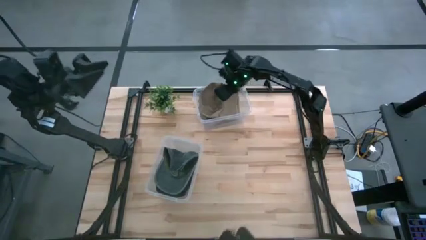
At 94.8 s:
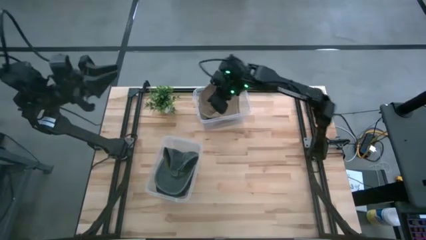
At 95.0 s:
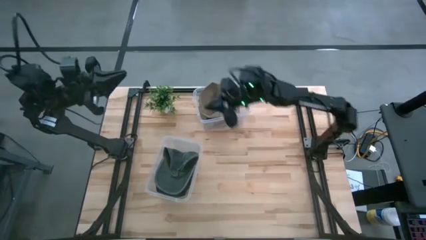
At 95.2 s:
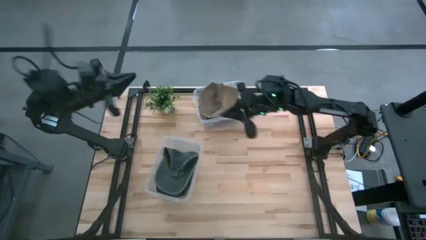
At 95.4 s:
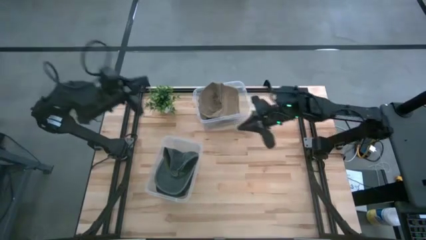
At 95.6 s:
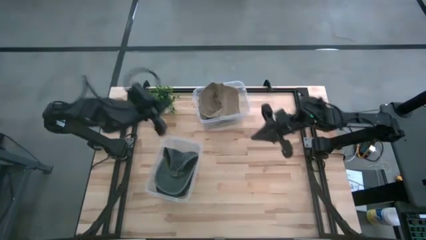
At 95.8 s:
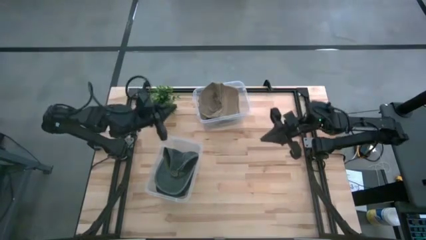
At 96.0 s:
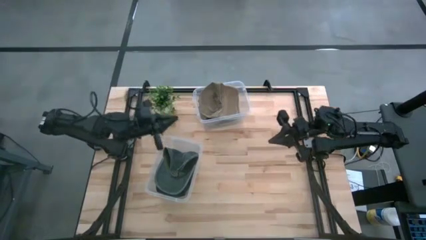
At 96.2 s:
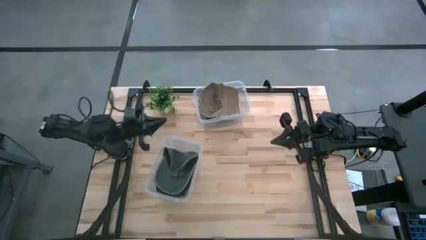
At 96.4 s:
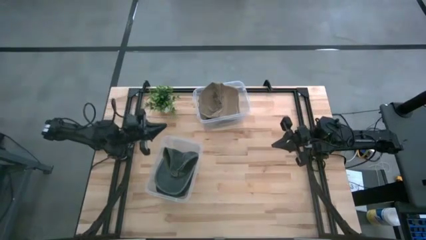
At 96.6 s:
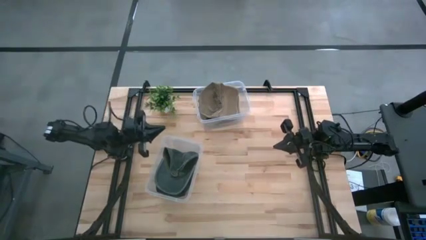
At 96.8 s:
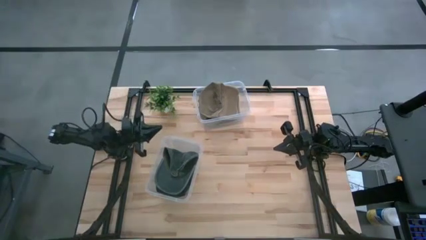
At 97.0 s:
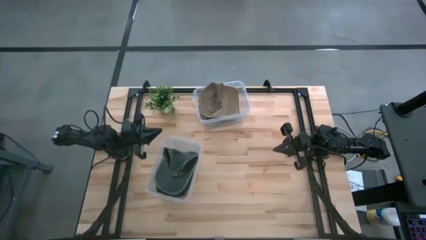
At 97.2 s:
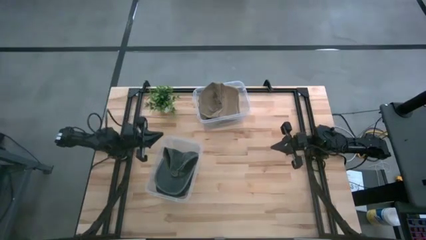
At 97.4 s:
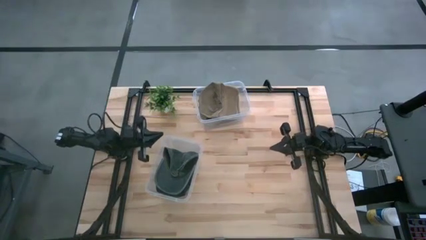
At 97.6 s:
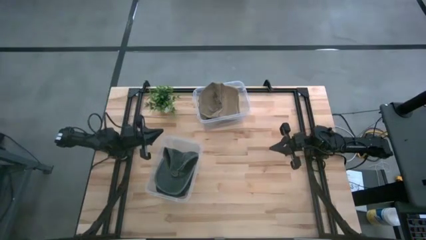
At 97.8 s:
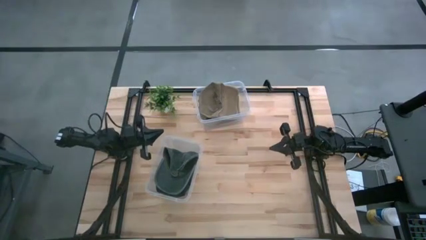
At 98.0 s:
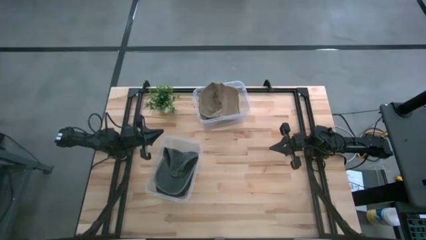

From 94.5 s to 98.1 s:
Task: Pick & Place hat
Return to Home Position

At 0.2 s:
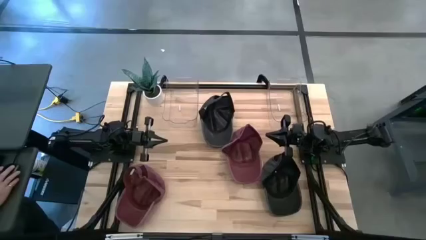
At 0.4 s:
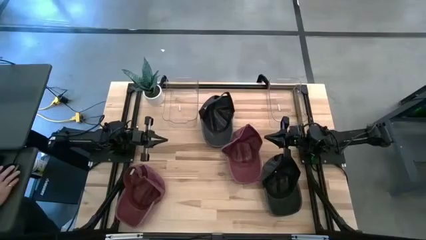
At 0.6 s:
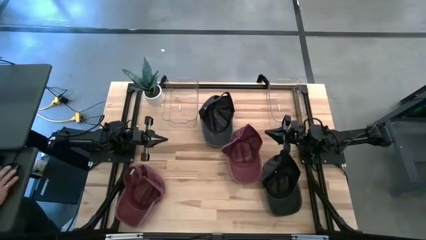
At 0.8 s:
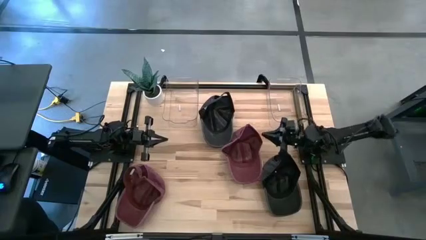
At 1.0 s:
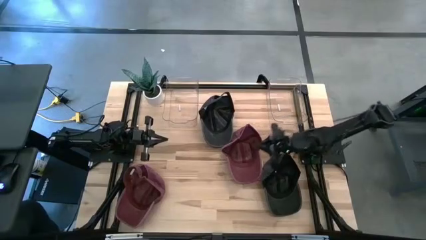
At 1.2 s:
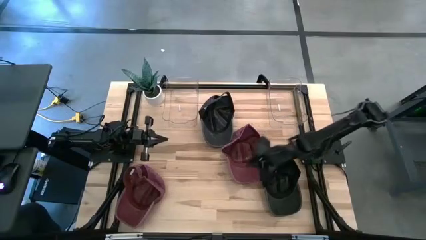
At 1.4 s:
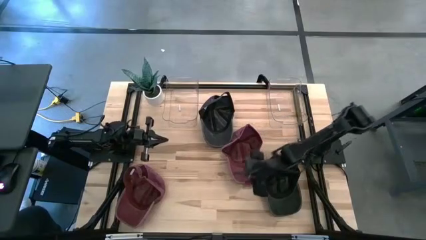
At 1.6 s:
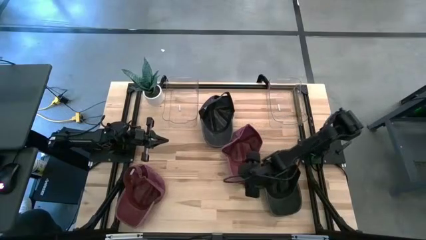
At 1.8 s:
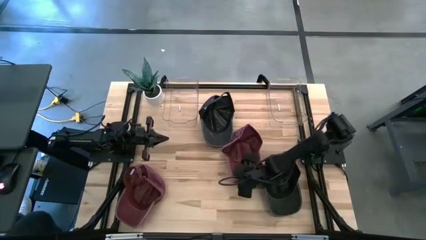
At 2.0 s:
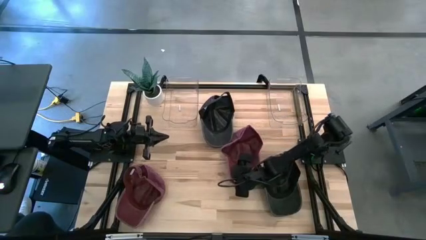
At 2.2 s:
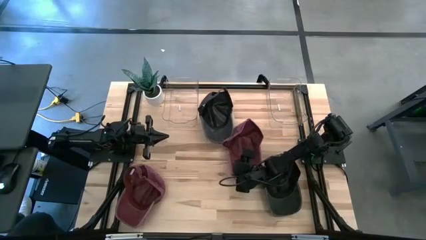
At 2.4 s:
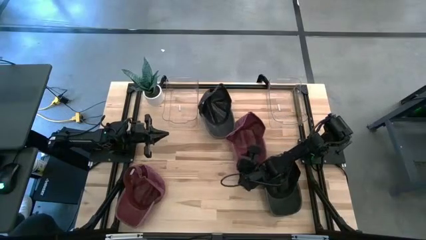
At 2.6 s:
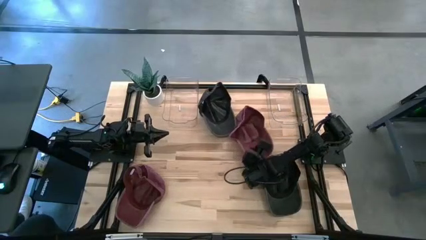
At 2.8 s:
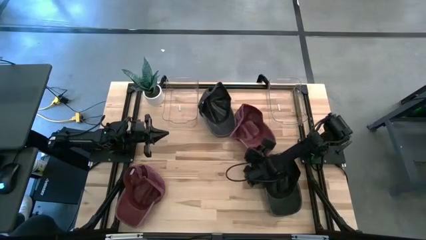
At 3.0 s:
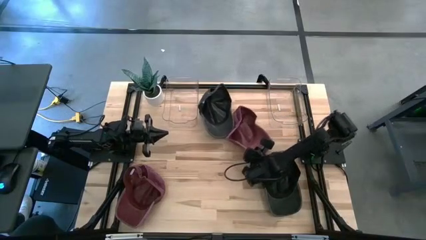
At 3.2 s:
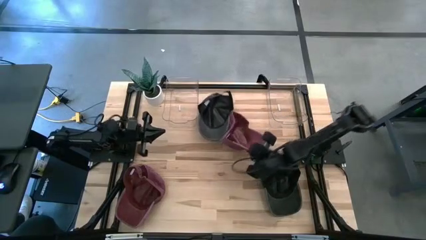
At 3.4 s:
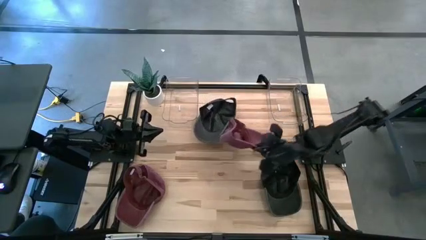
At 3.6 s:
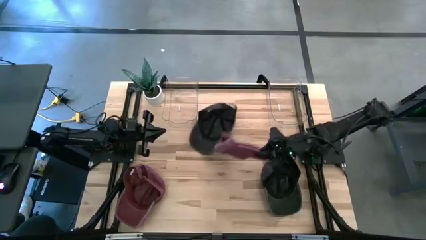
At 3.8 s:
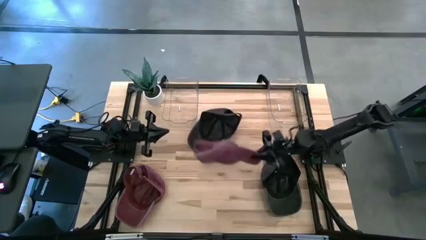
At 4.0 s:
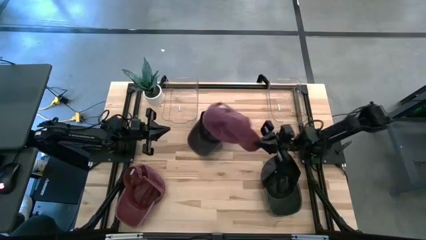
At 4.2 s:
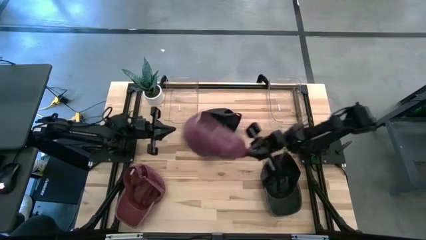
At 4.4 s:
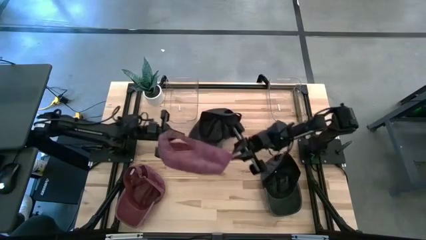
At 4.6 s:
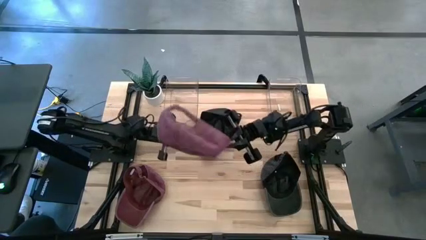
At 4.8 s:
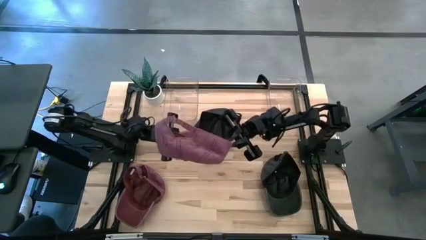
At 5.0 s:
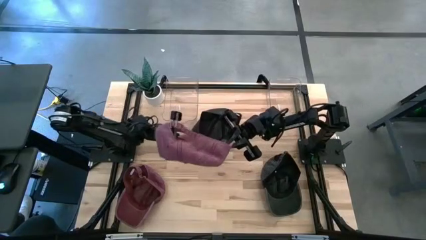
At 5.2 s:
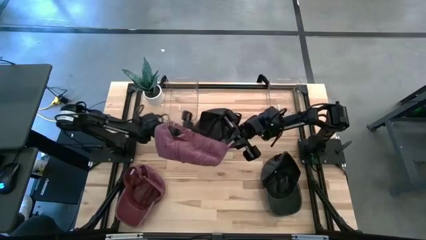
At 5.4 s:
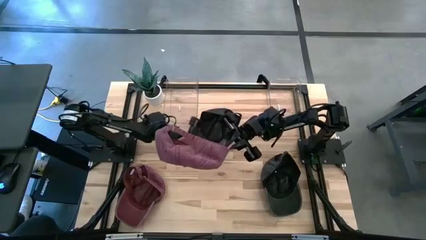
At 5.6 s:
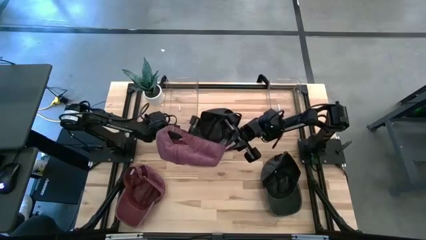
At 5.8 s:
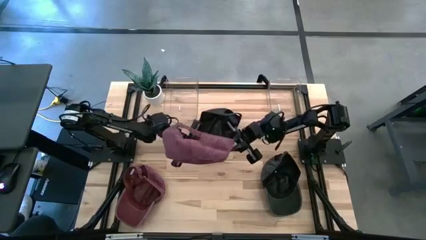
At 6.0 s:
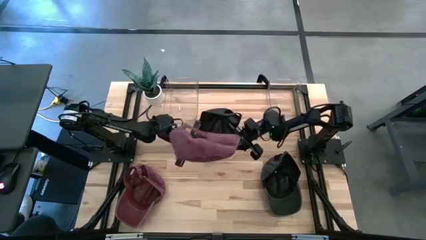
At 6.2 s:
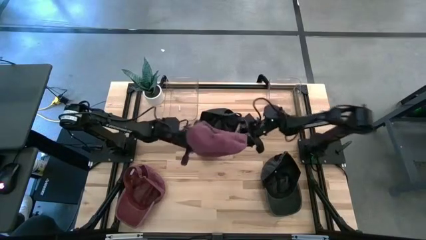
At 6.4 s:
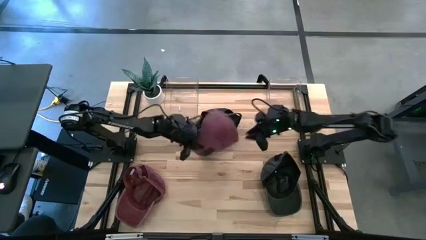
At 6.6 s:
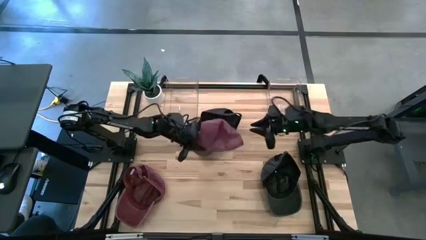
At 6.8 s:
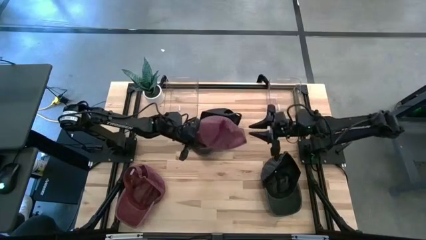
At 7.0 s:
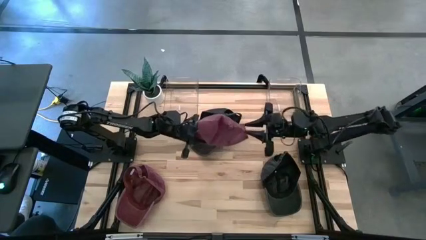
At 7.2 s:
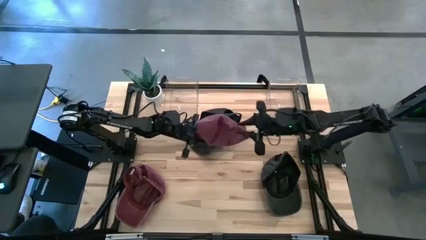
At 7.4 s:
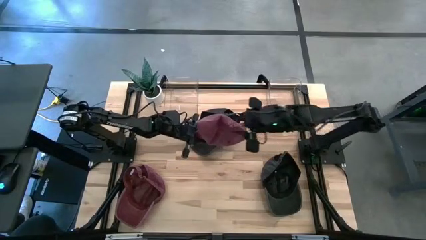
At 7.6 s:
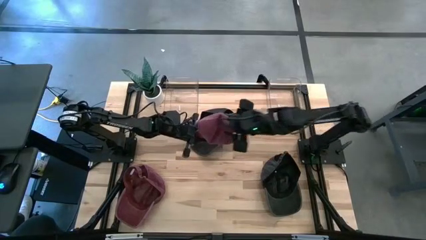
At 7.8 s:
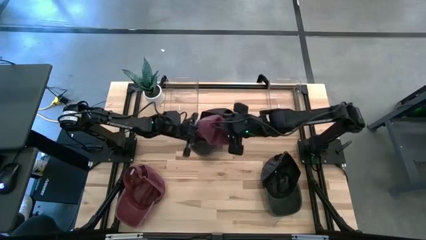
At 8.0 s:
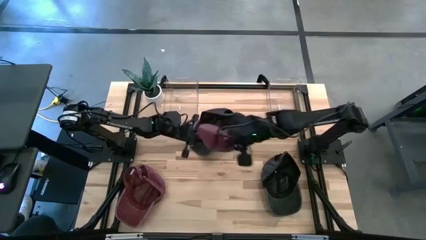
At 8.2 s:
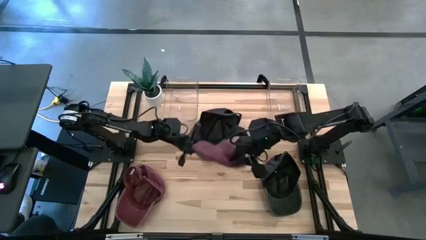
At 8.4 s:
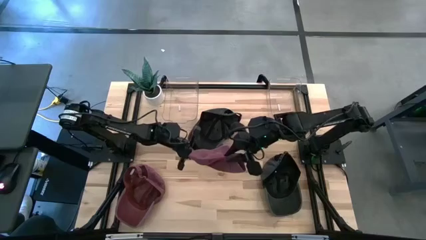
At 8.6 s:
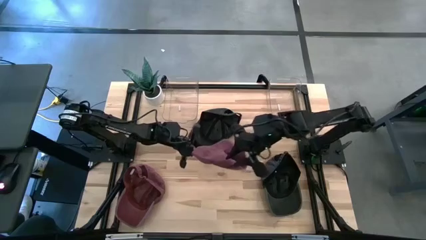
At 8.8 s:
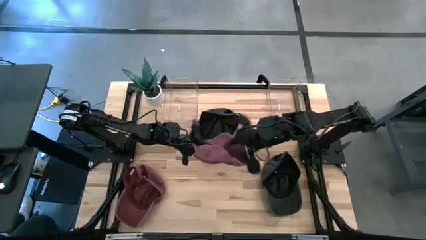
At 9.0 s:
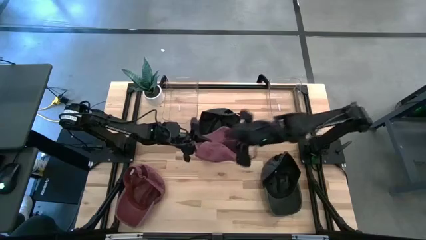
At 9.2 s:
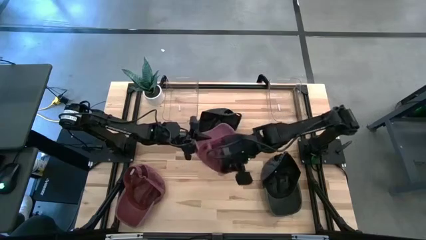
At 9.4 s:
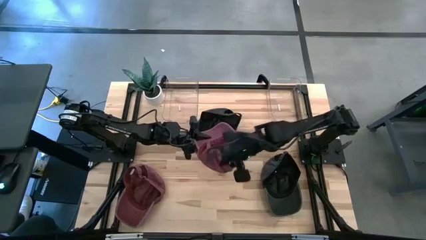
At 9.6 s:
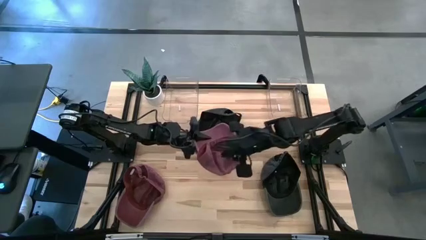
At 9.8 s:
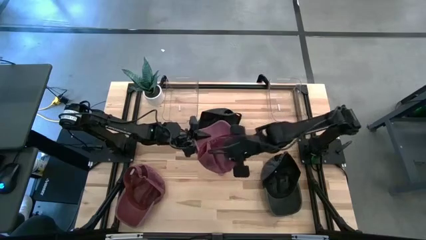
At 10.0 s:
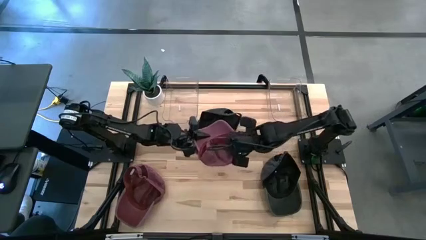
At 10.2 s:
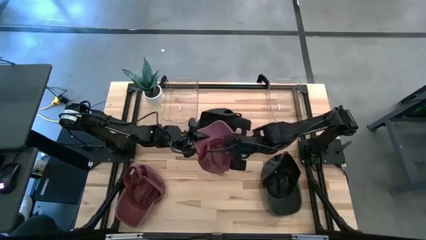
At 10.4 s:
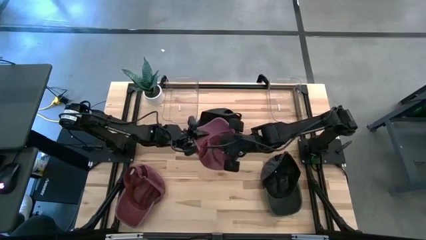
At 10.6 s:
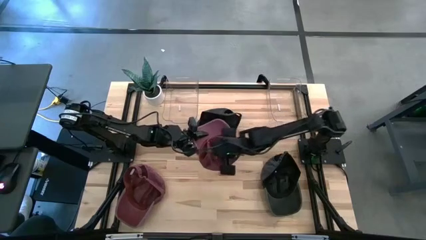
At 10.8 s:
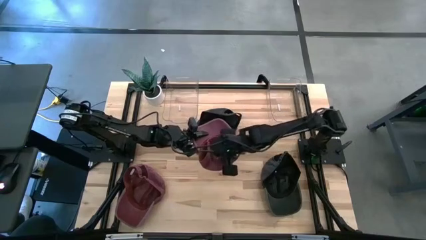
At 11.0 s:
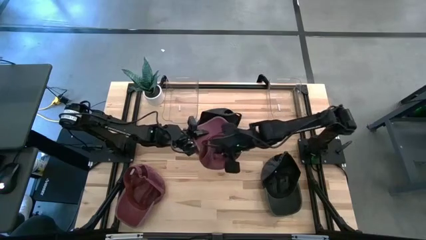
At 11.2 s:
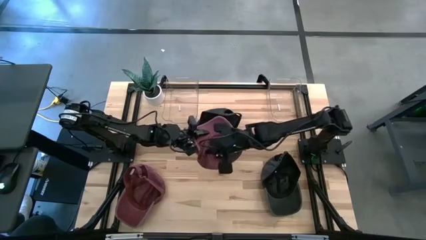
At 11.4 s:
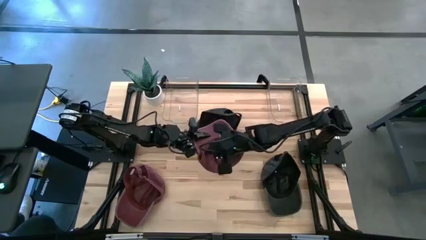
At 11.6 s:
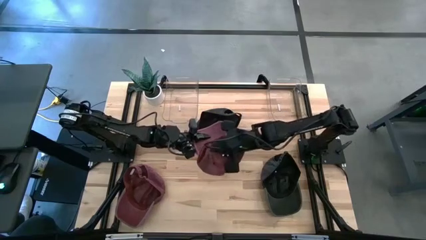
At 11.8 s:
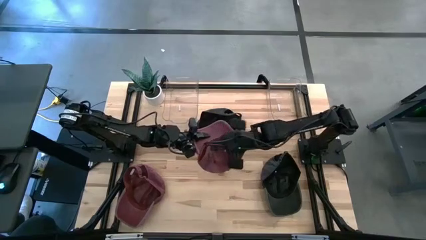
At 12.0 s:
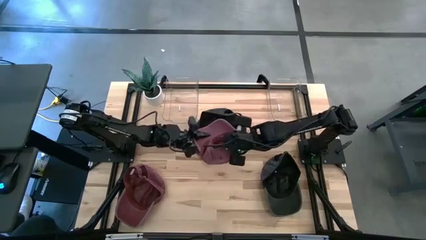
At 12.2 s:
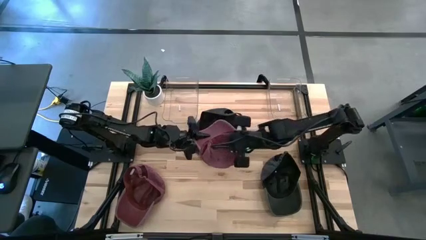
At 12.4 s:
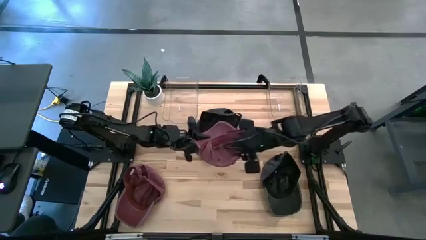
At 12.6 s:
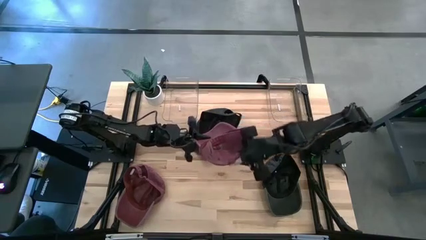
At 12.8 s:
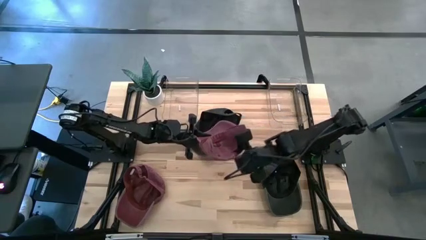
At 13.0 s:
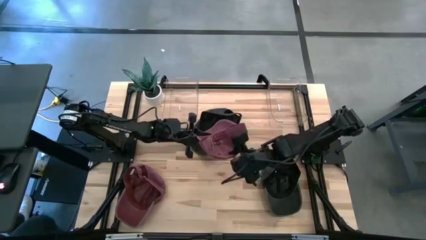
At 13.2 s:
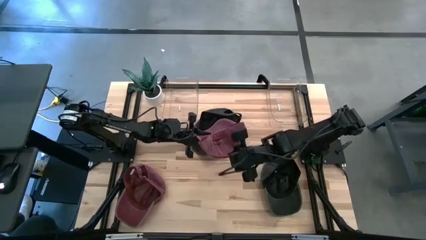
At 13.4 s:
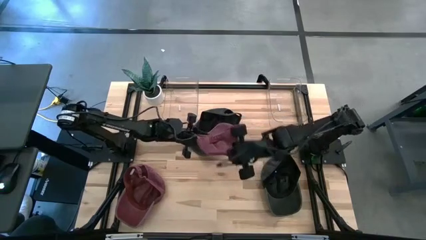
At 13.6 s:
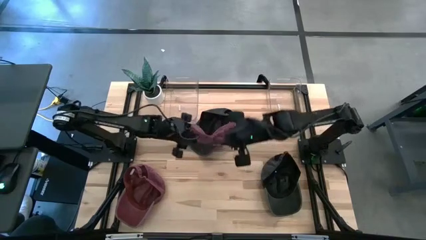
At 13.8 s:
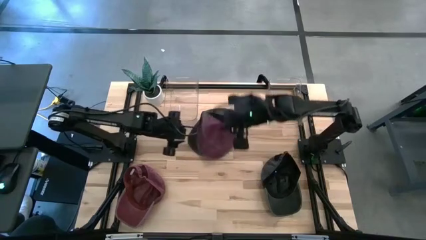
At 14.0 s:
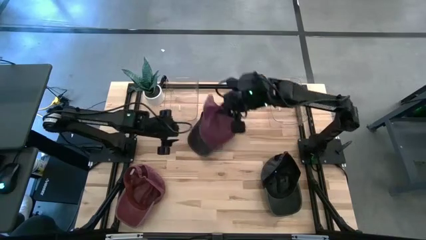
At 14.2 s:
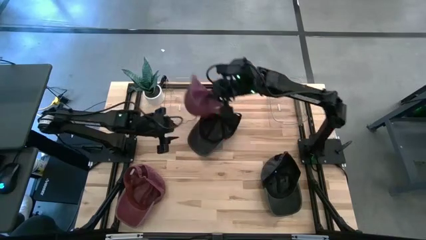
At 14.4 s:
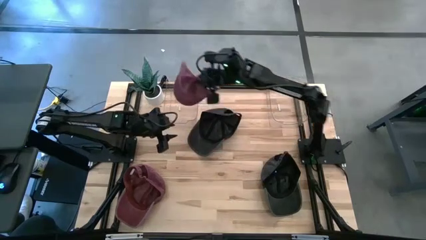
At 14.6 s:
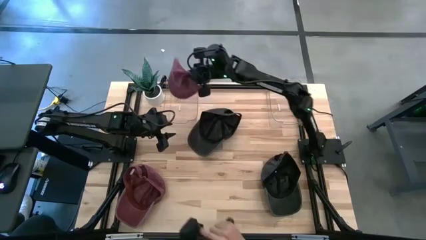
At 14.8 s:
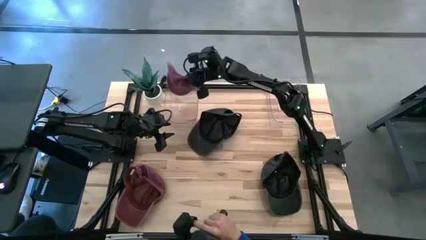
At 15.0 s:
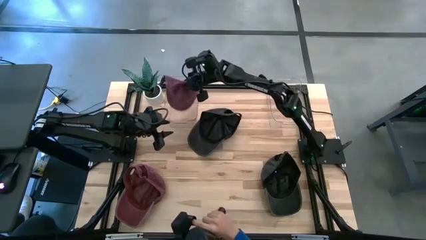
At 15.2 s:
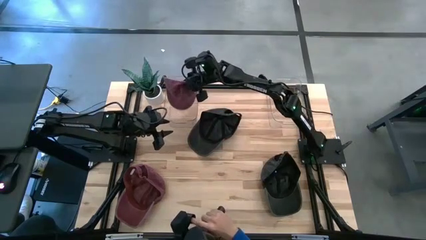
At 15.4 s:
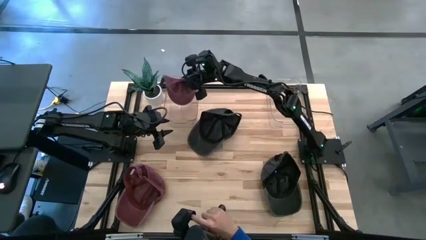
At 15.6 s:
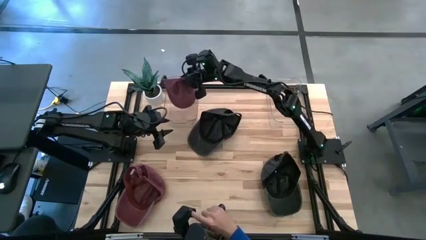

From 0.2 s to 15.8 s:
Task: Pick & Place hat
Put the top red cap into the left transparent bin
